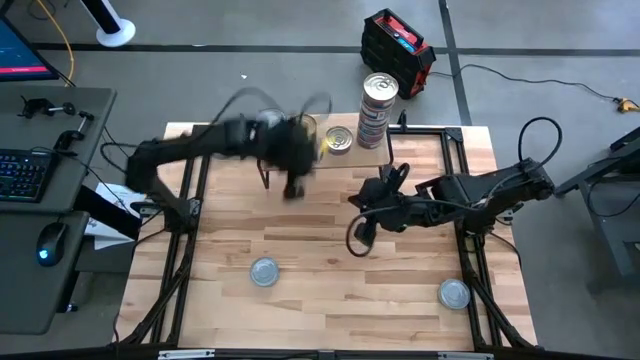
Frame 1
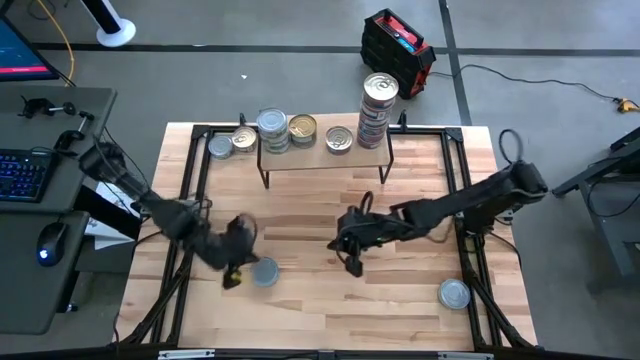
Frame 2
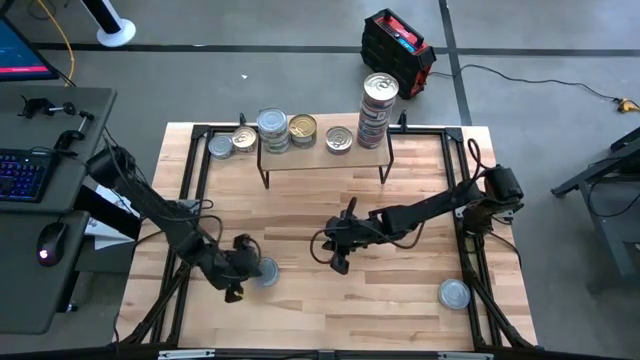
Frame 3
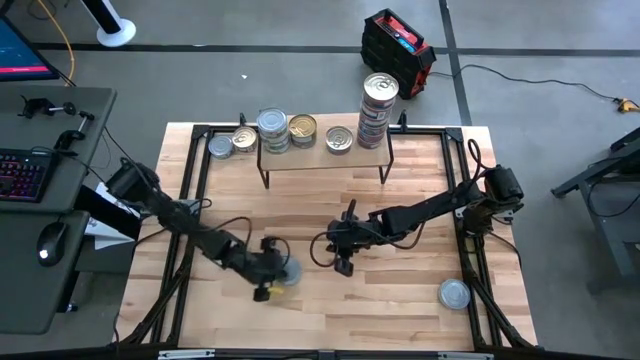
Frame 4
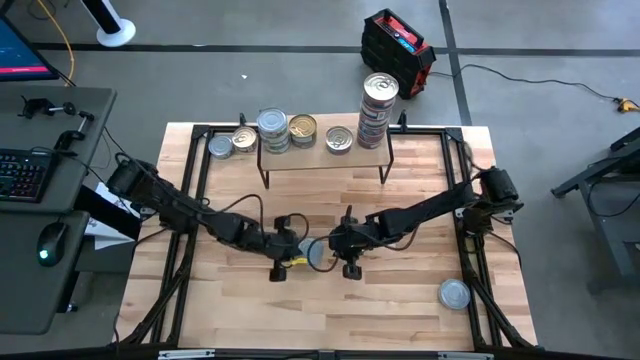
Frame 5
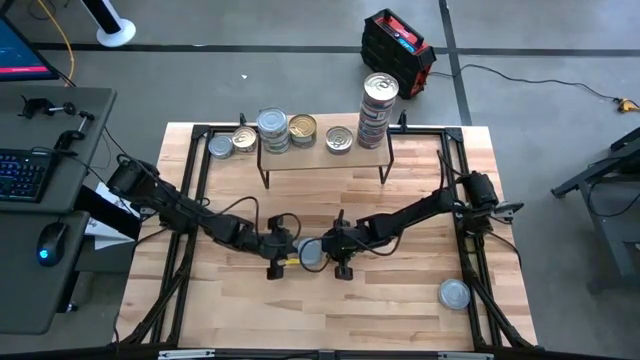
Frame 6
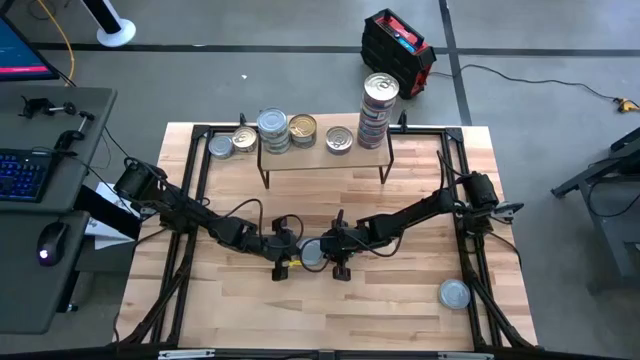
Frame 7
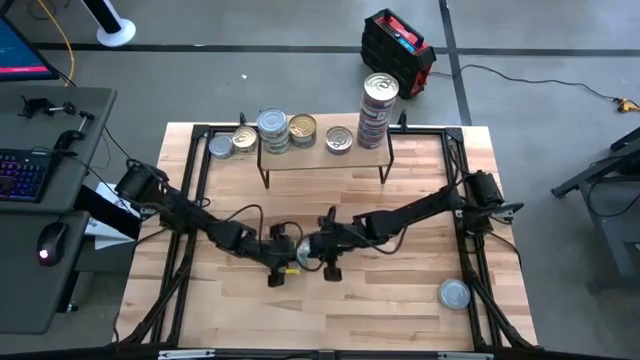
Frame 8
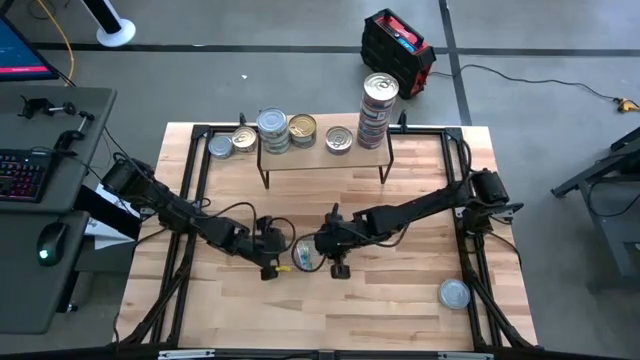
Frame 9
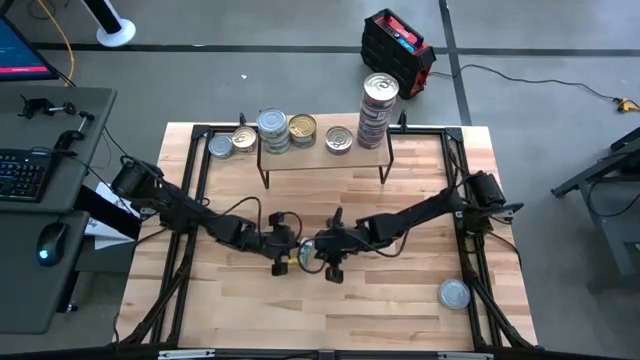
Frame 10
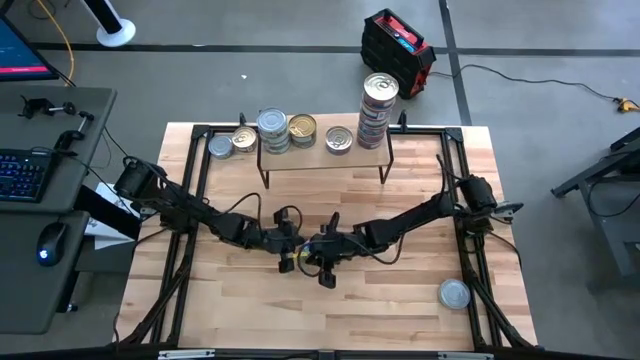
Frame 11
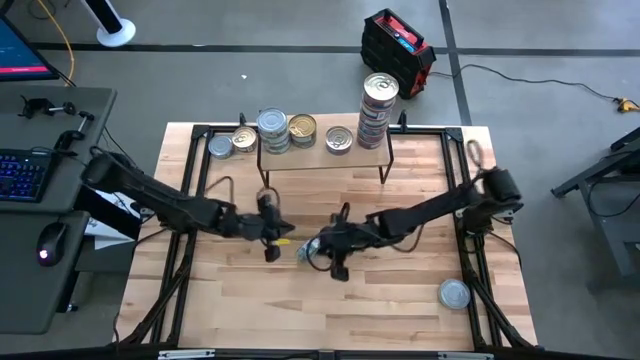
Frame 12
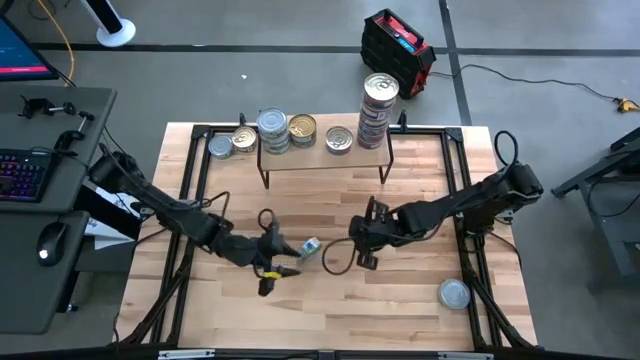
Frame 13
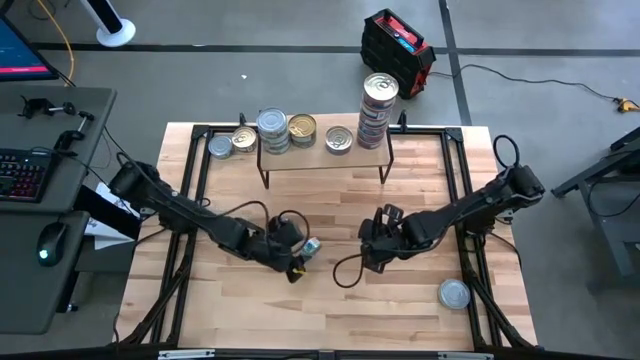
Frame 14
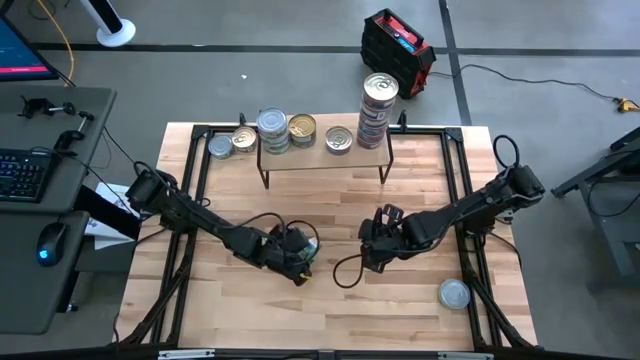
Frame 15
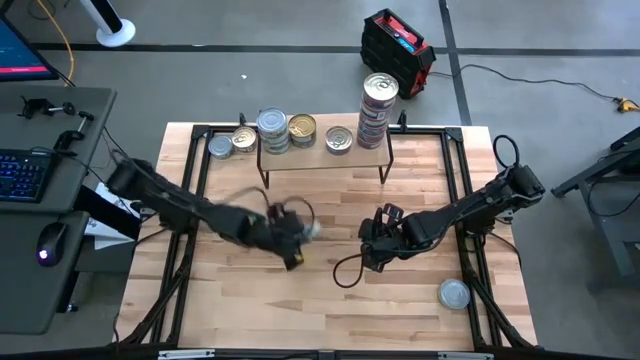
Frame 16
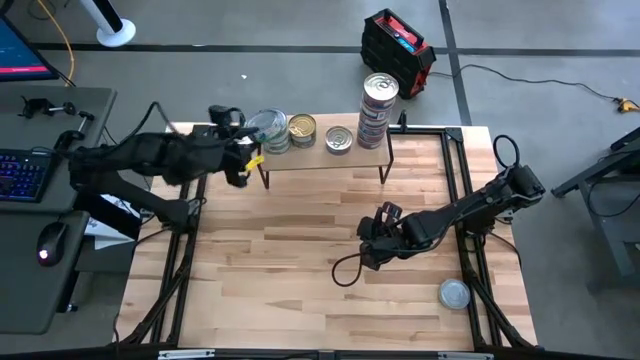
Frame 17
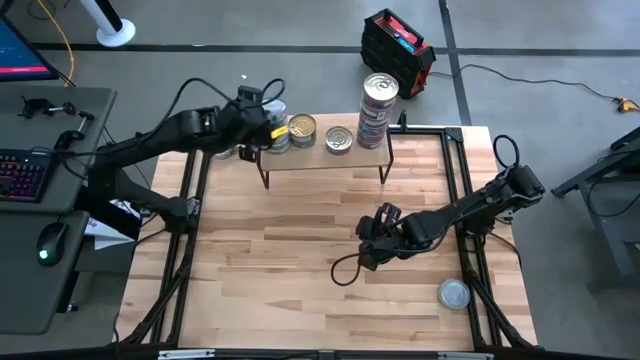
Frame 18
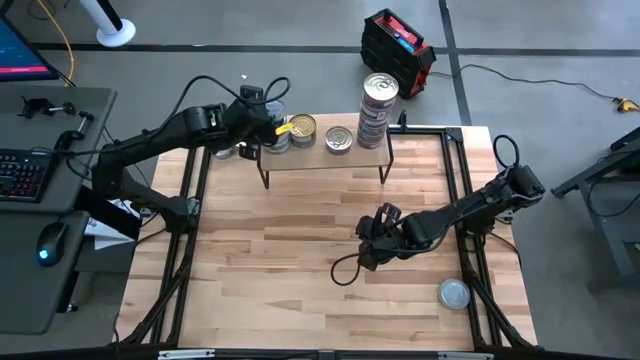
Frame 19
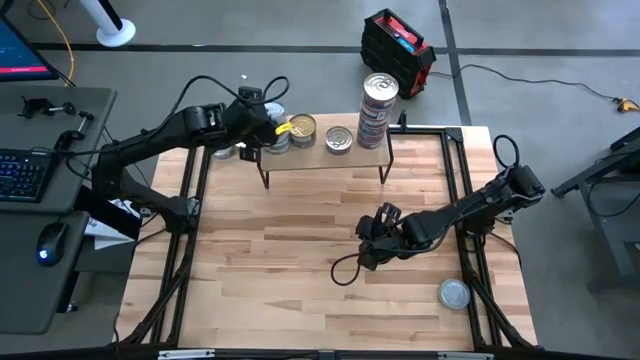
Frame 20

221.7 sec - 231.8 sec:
Task: Stack canned seafood by type on shelf
Stack the green white tuna can on top of the other green white tuna cans on the shelf

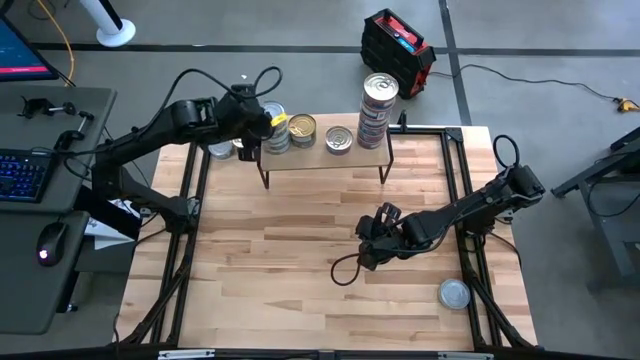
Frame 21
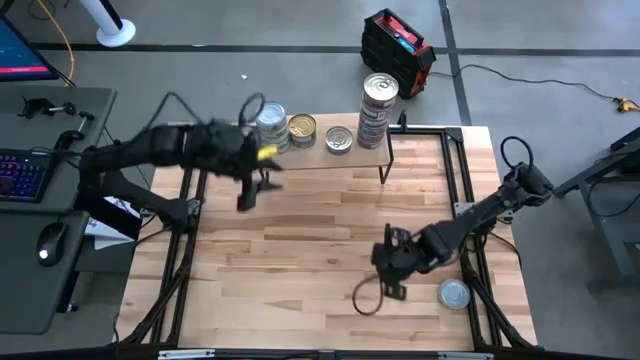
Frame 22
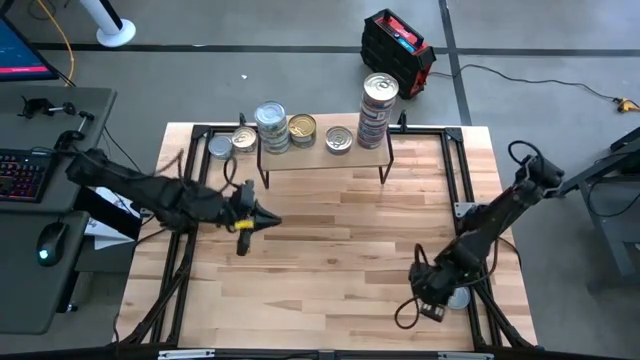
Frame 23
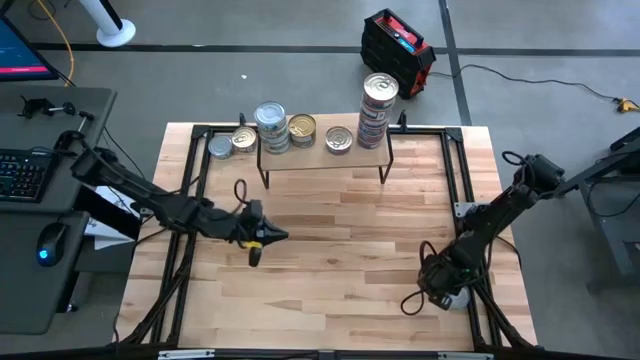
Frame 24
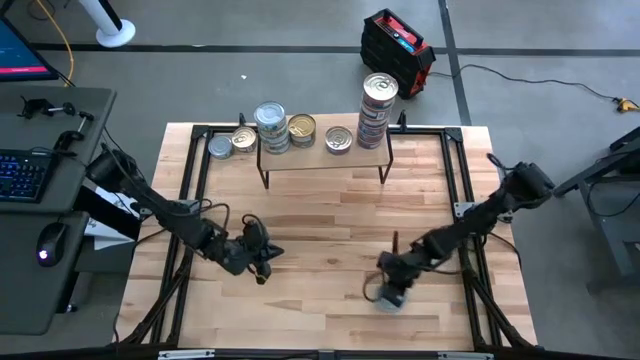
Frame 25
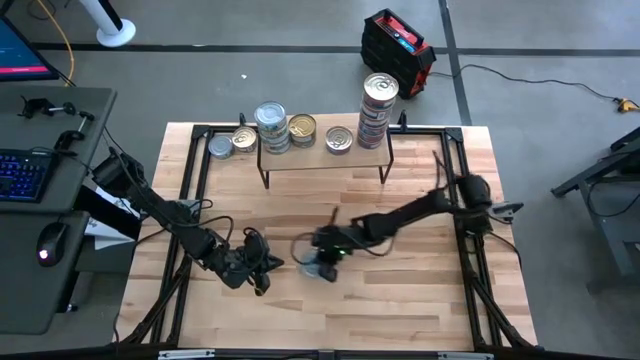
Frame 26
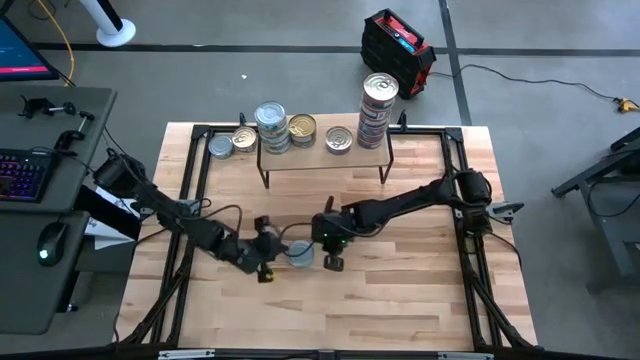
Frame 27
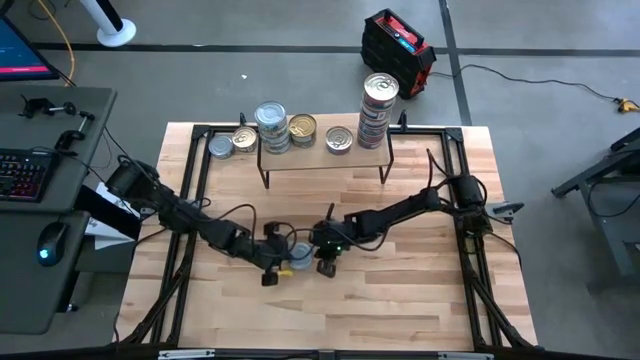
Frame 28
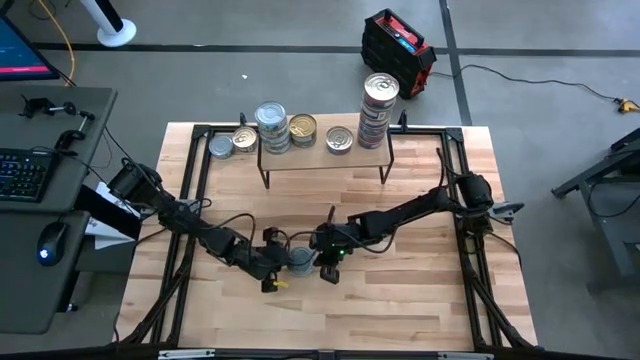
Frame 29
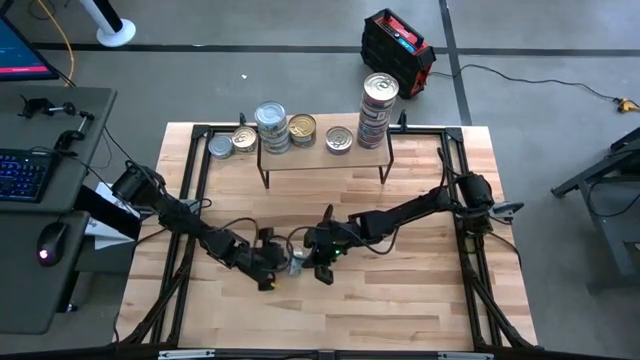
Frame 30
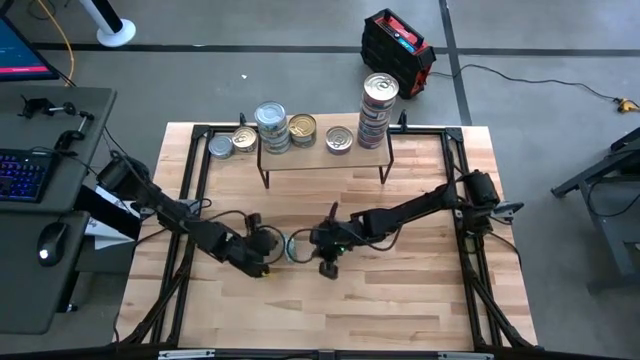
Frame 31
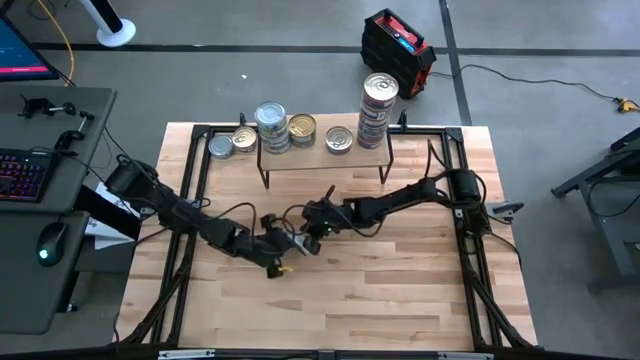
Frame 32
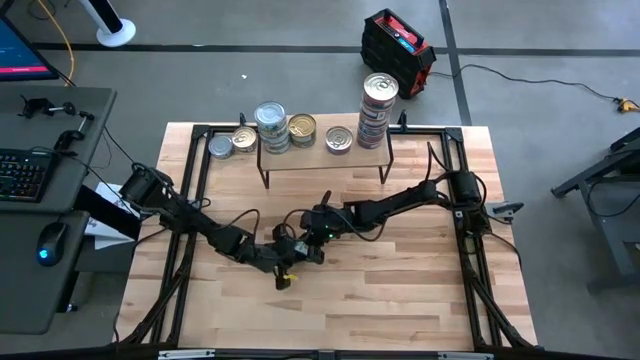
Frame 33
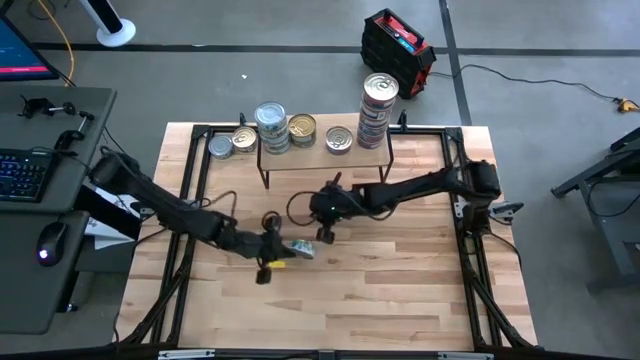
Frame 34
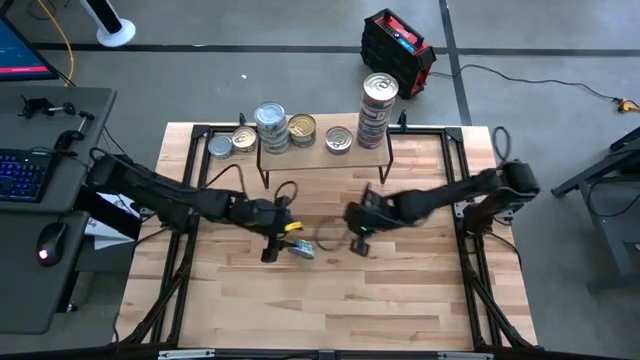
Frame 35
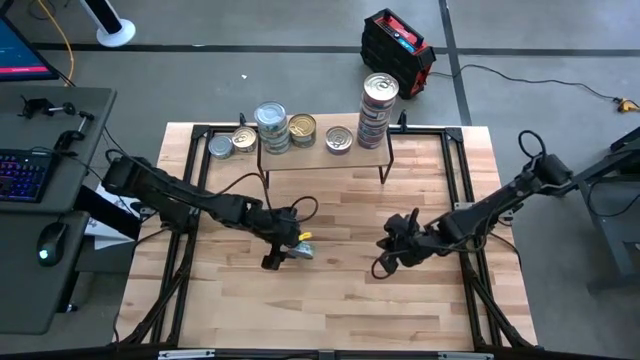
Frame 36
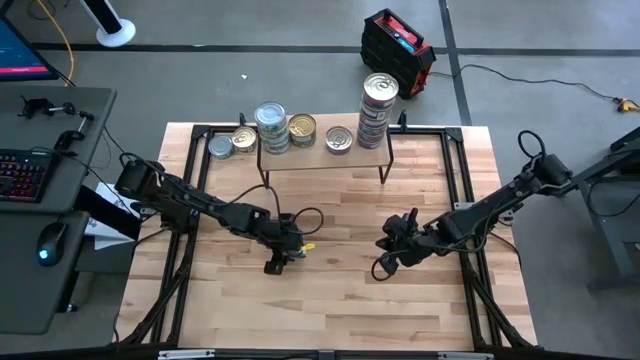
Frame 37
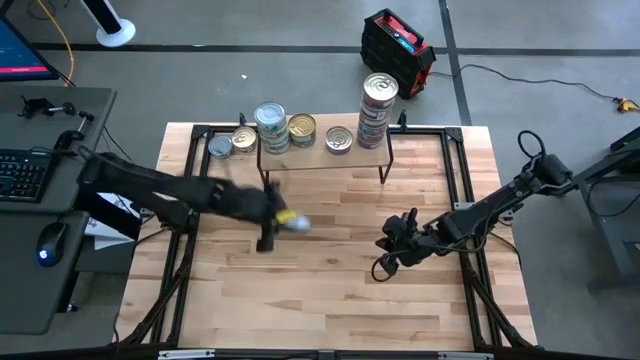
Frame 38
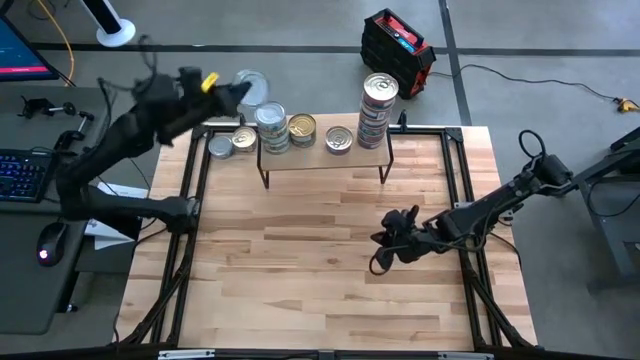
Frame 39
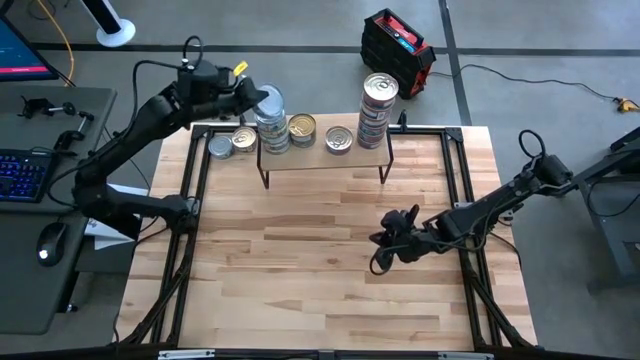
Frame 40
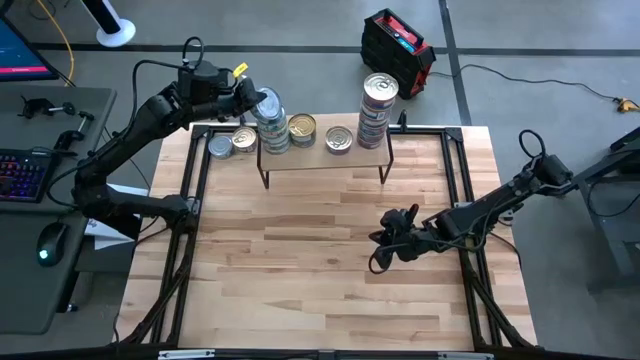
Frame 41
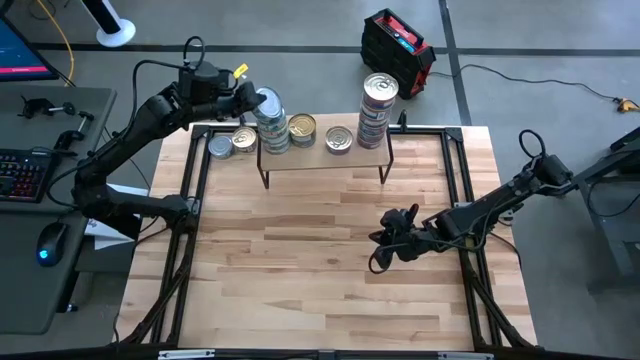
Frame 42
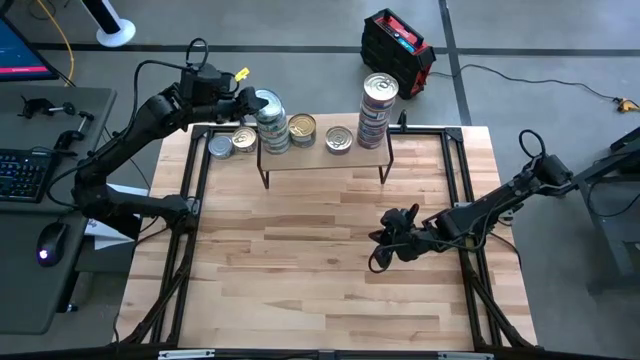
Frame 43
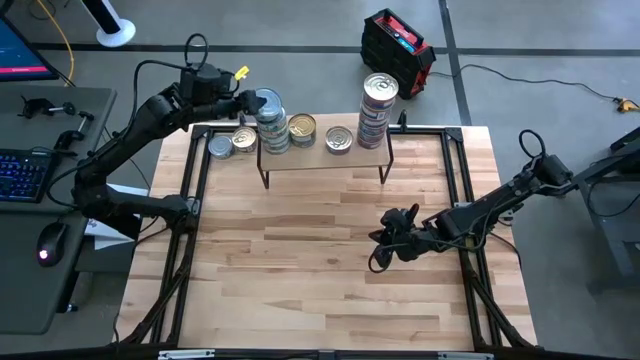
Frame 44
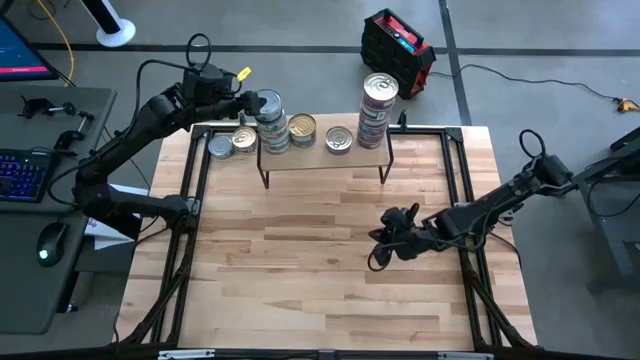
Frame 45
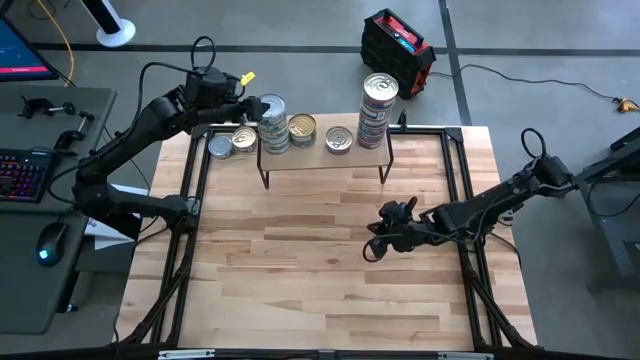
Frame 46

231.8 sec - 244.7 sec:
Stack the green white tuna can on top of the other green white tuna cans on the shelf
